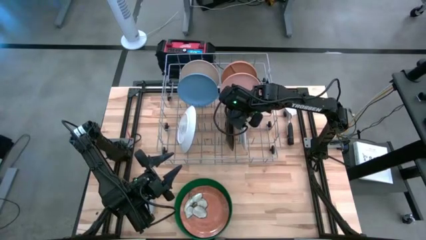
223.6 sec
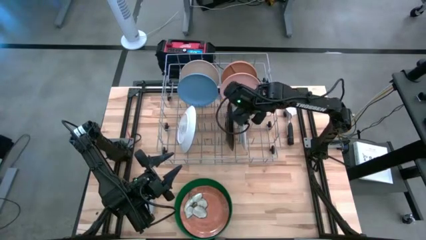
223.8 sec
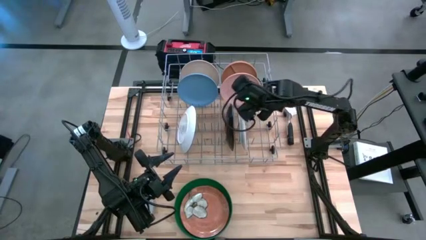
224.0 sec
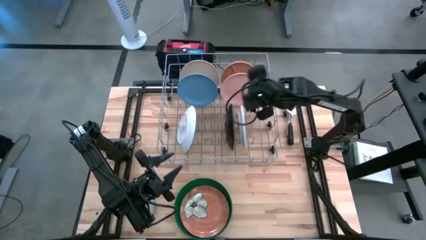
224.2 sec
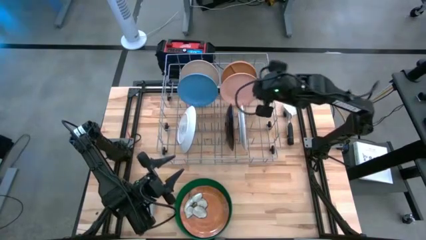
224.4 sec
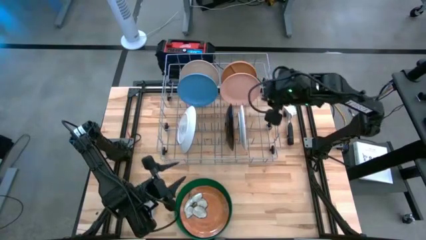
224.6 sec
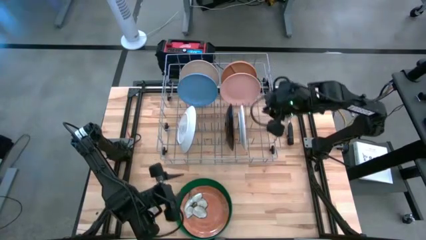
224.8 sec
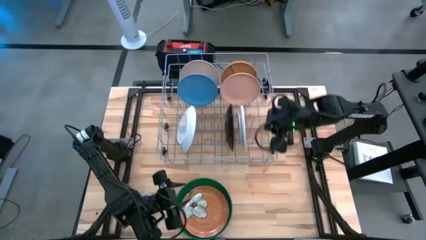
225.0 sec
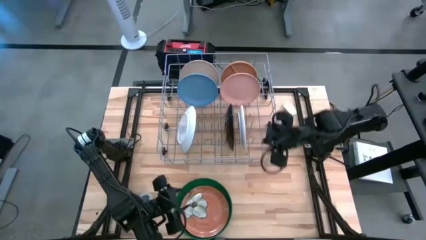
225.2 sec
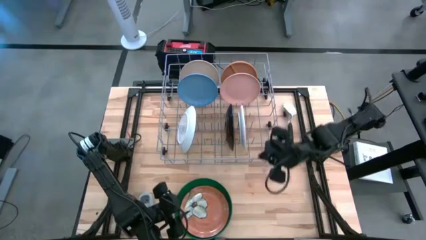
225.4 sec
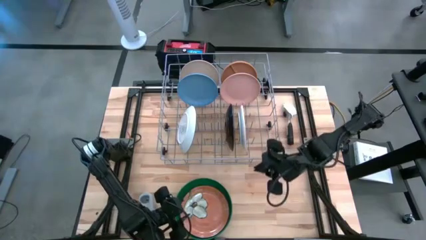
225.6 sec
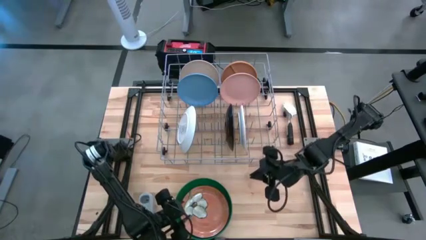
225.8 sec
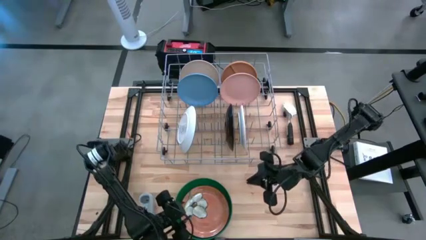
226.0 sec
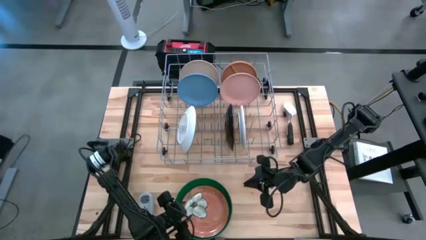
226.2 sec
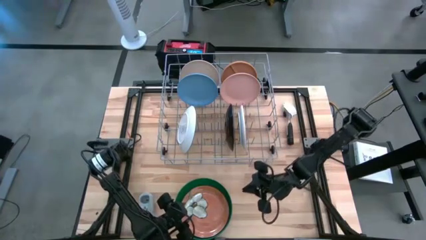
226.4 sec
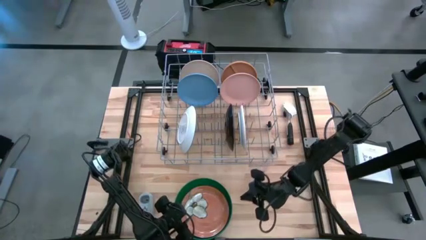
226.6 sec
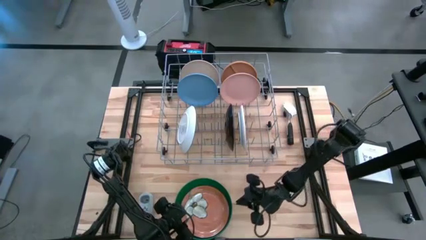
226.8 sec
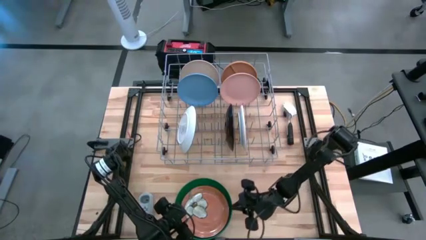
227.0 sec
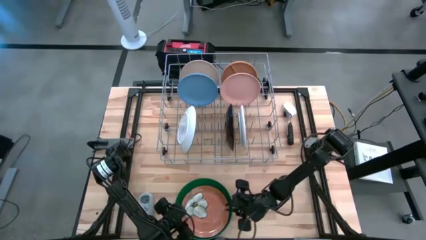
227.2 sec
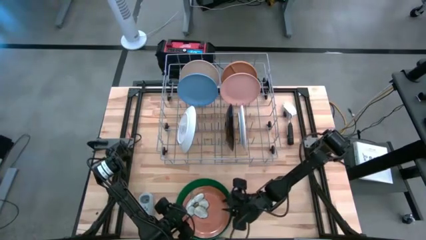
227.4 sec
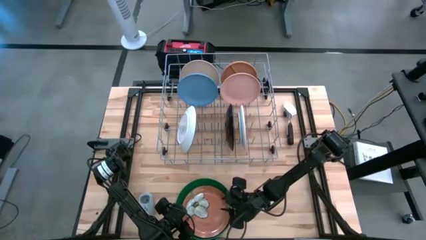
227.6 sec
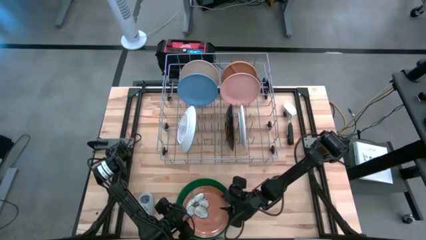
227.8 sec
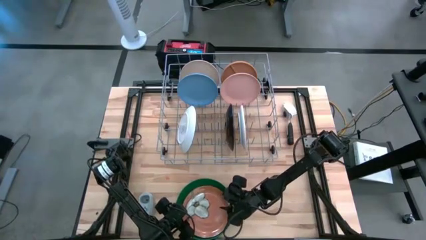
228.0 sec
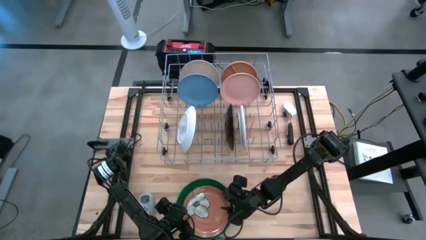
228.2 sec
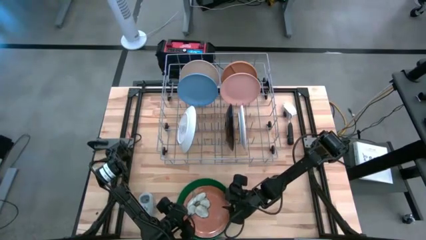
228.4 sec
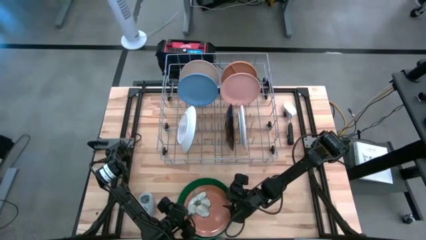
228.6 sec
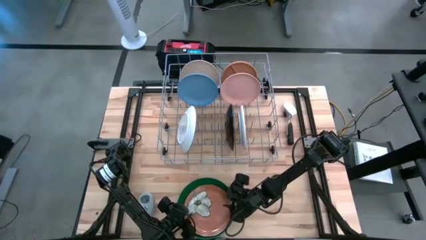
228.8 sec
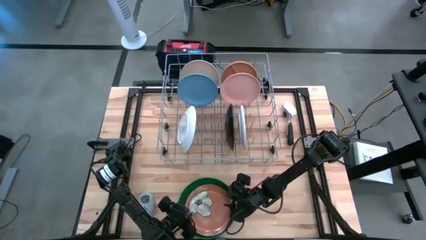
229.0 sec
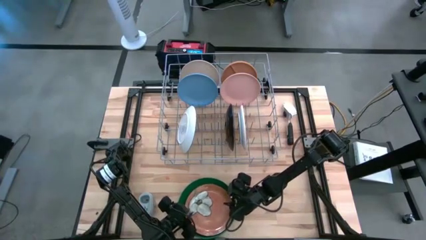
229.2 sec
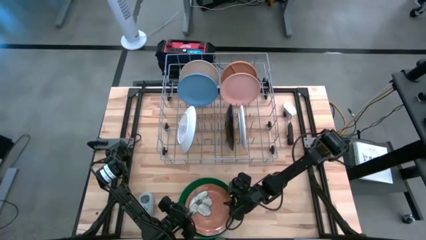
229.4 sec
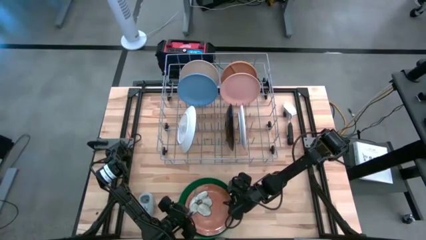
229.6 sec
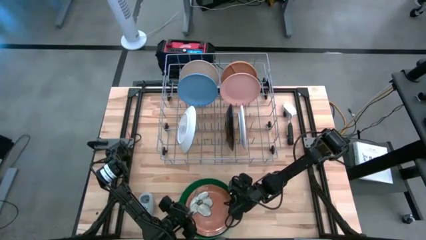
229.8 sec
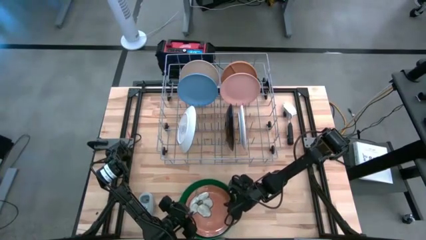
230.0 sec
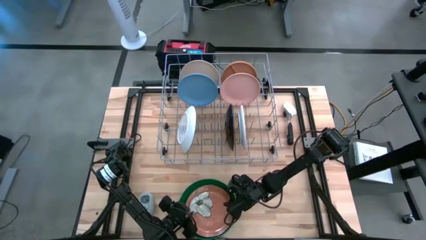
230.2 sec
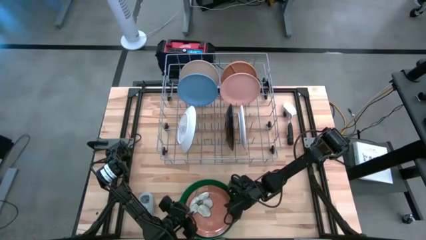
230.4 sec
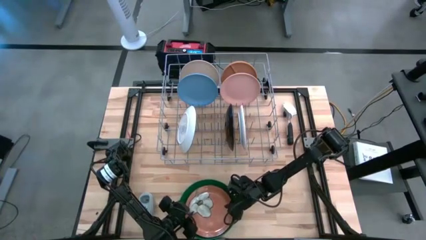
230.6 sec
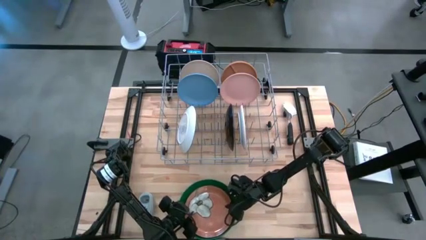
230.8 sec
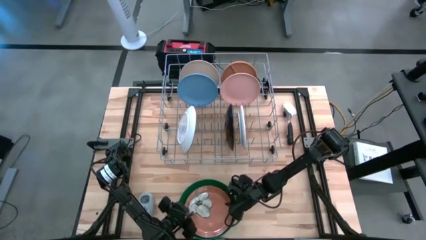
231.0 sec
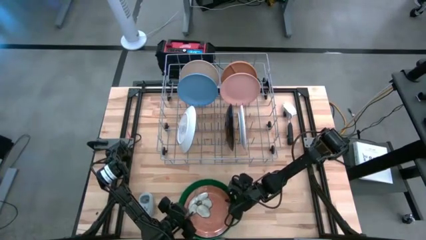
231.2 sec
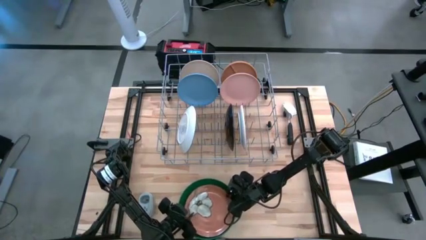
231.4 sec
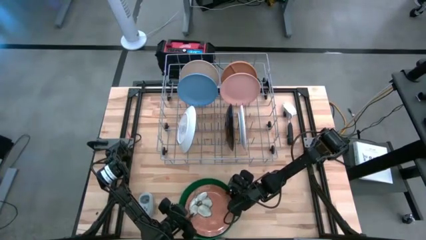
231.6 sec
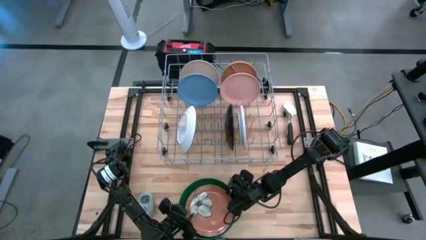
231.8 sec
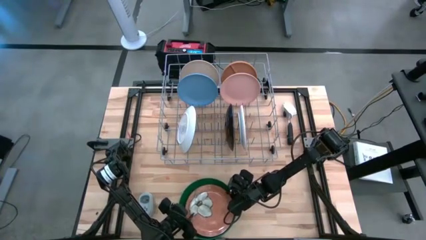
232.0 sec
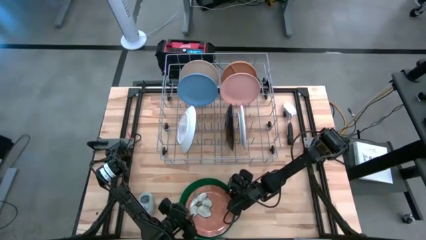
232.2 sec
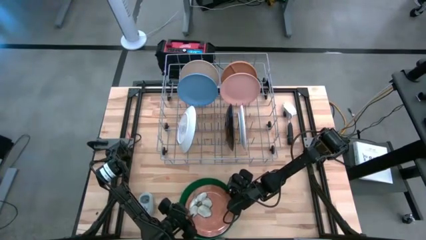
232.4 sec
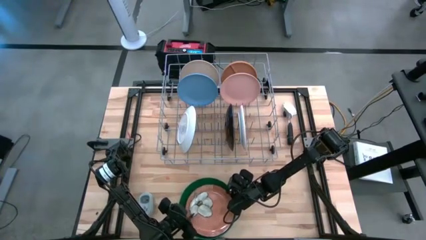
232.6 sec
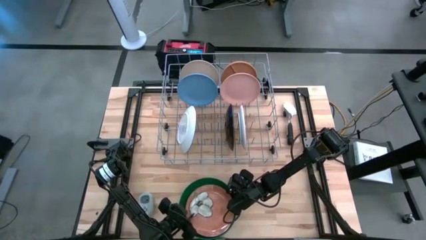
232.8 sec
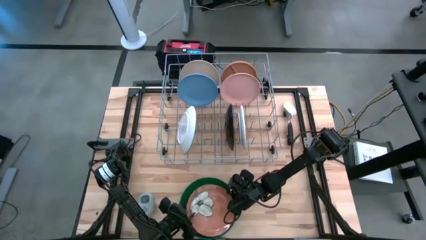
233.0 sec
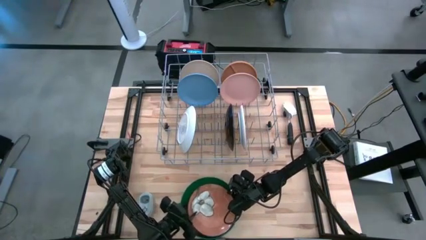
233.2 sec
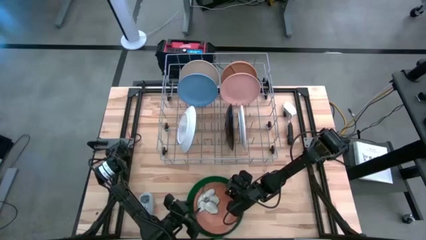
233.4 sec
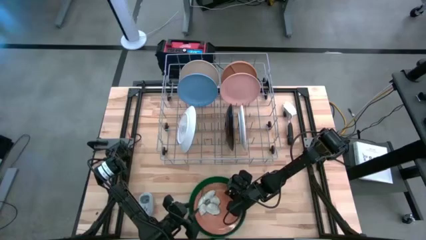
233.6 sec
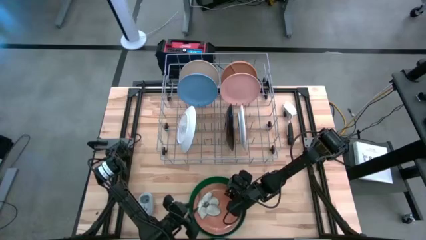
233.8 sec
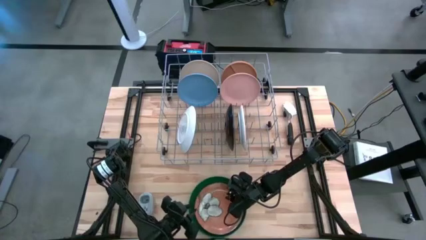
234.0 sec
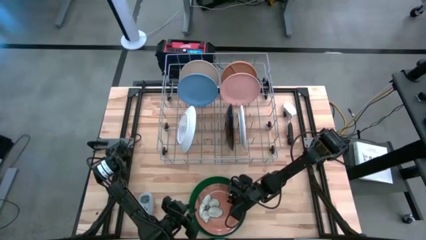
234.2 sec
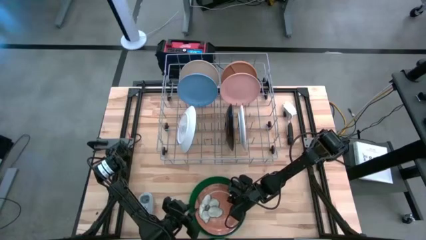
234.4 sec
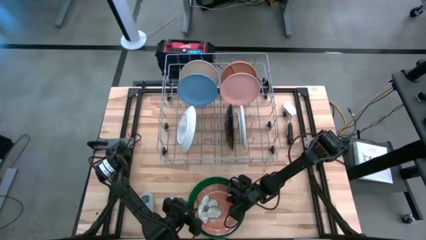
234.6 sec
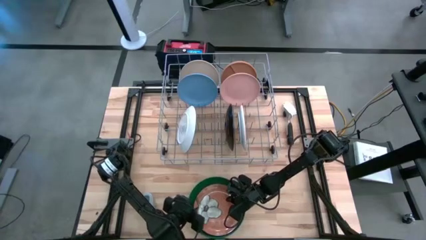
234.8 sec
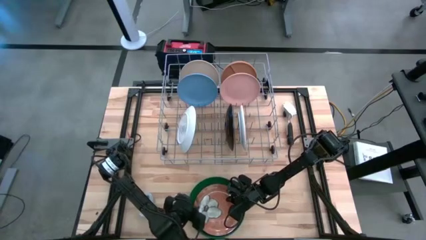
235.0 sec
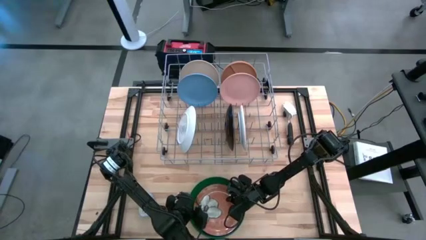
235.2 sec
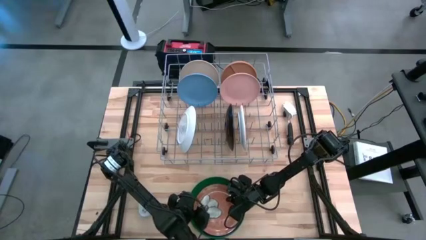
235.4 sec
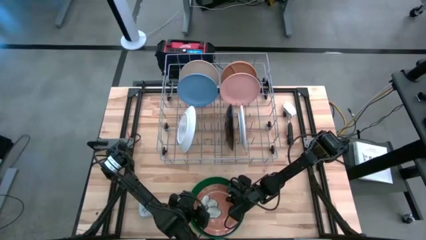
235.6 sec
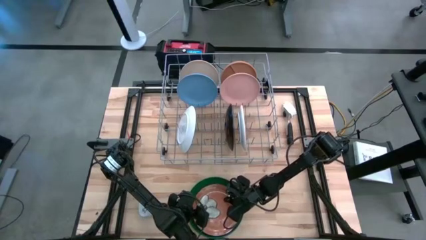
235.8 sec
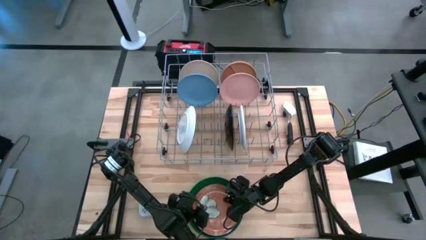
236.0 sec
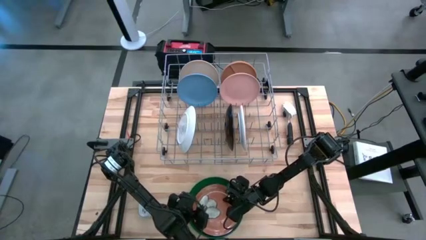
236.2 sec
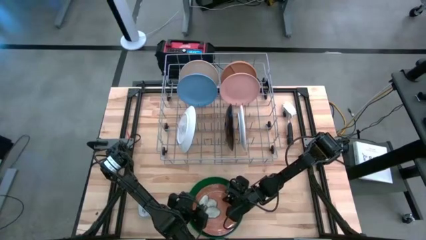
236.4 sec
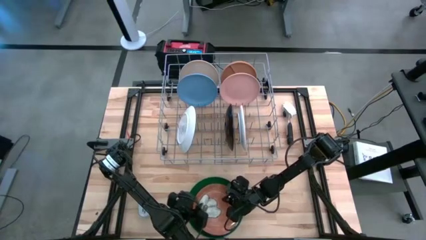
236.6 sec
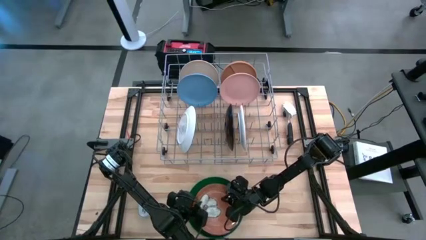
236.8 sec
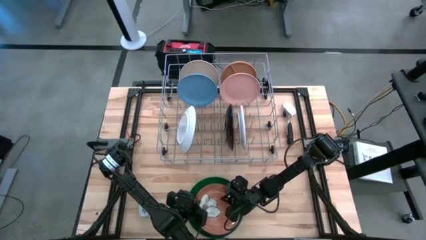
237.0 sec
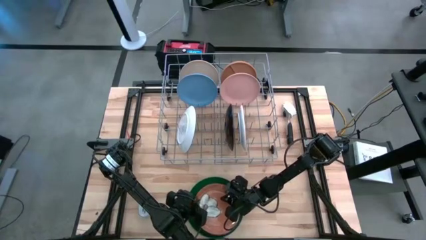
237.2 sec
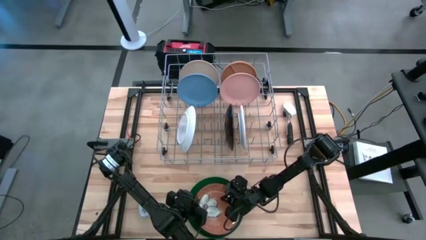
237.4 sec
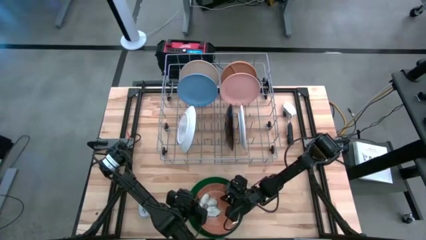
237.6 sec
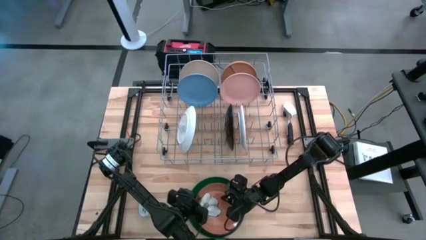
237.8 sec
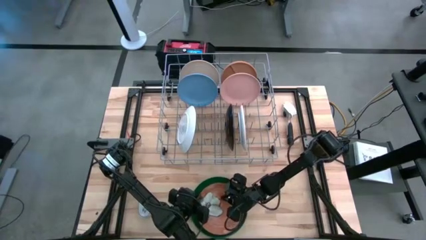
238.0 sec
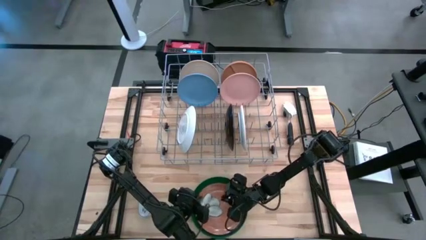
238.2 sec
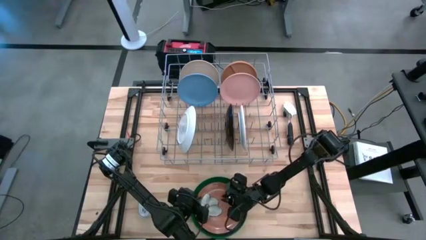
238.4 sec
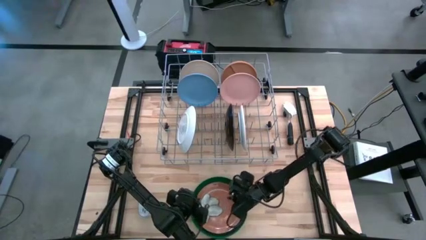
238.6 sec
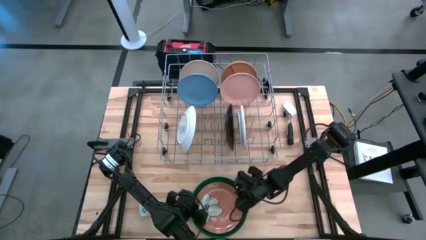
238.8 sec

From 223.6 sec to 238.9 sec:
Task: Sort dishes
Put the orange flower patterned plate into the dish rack
